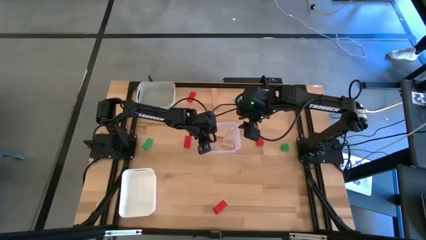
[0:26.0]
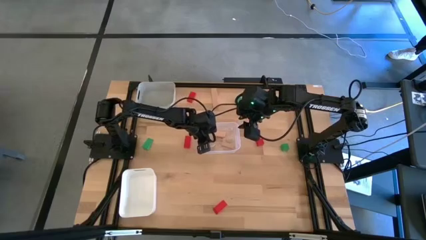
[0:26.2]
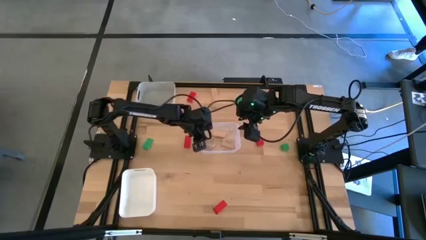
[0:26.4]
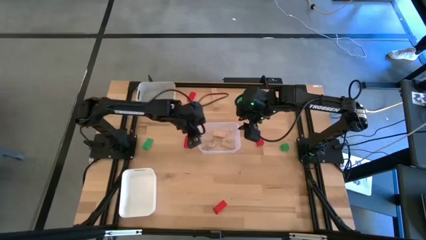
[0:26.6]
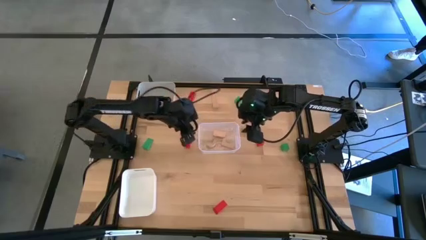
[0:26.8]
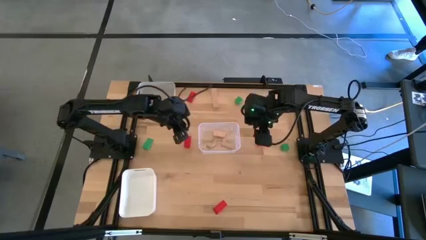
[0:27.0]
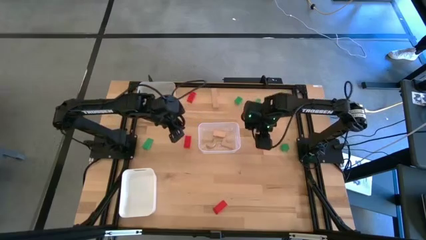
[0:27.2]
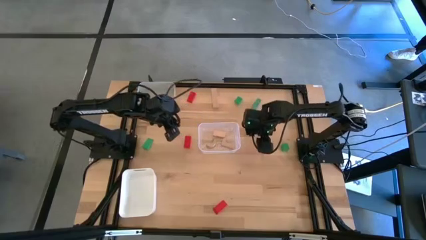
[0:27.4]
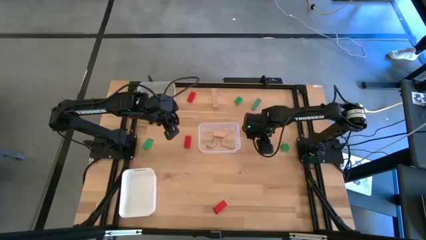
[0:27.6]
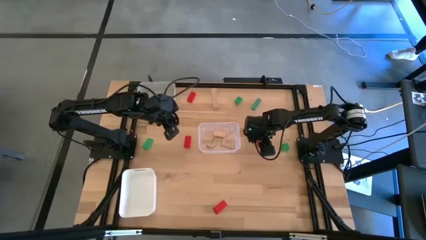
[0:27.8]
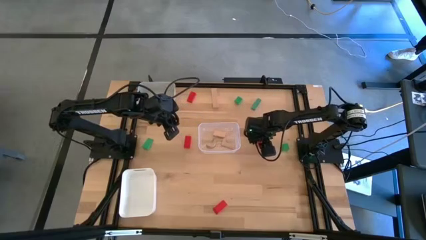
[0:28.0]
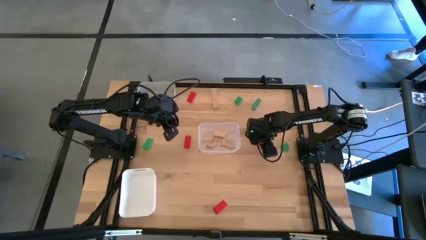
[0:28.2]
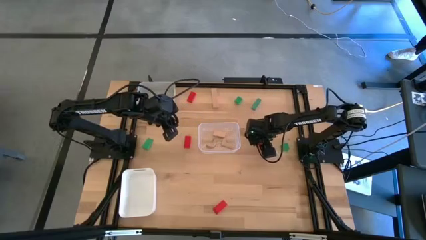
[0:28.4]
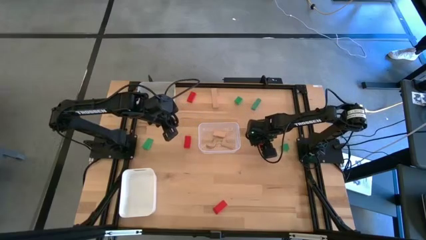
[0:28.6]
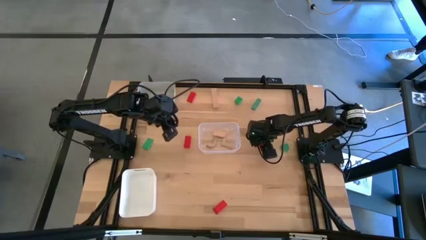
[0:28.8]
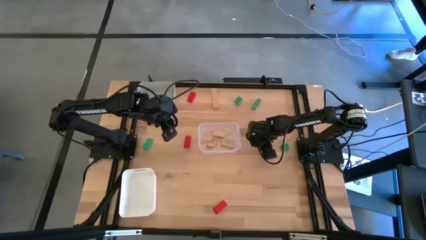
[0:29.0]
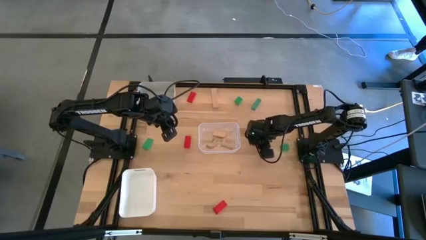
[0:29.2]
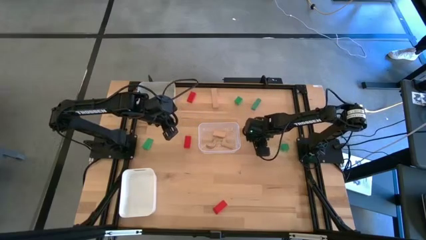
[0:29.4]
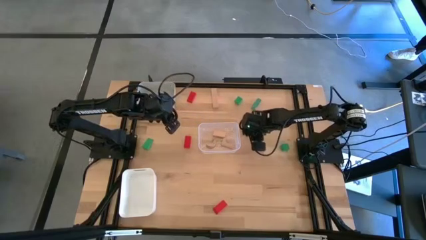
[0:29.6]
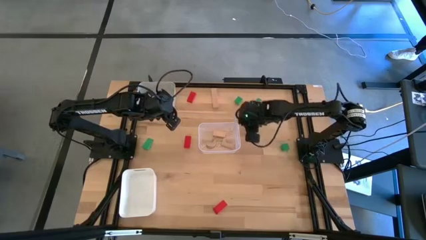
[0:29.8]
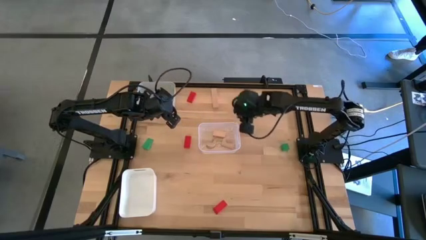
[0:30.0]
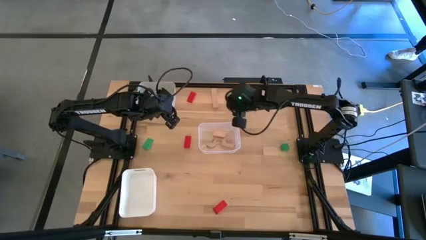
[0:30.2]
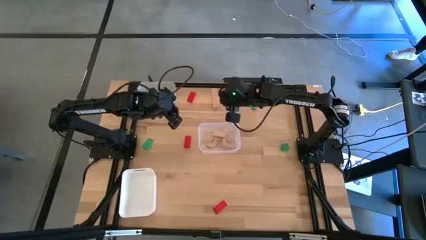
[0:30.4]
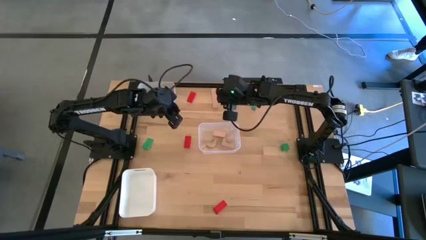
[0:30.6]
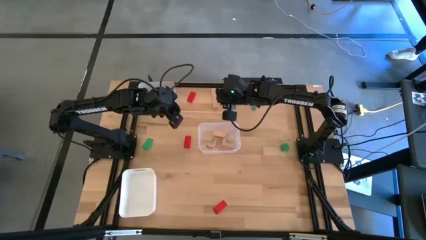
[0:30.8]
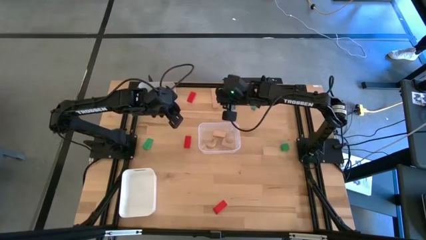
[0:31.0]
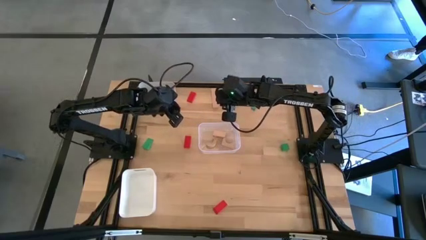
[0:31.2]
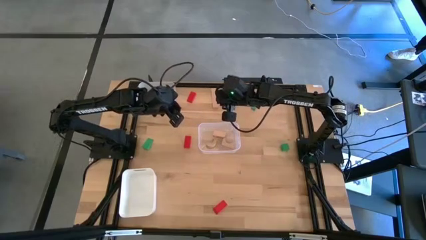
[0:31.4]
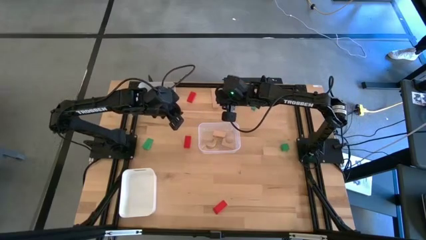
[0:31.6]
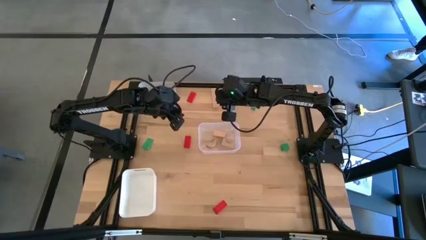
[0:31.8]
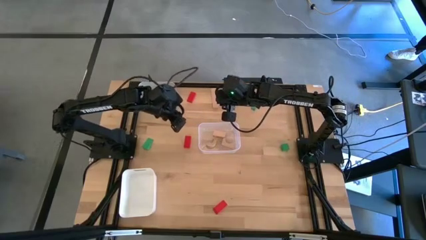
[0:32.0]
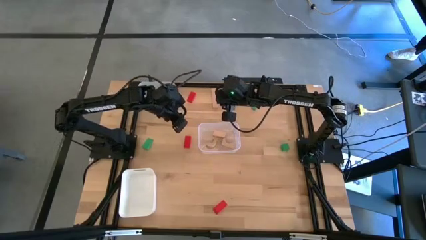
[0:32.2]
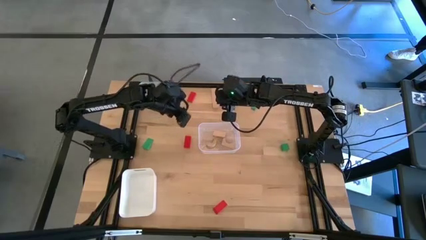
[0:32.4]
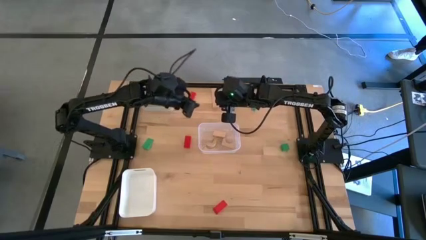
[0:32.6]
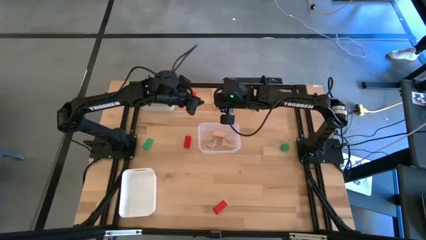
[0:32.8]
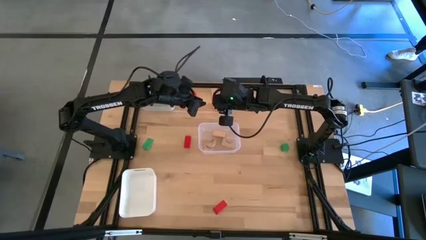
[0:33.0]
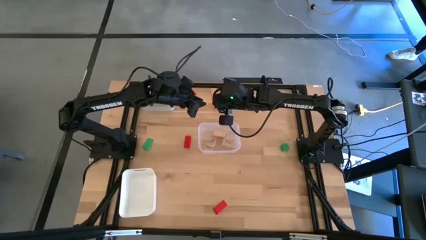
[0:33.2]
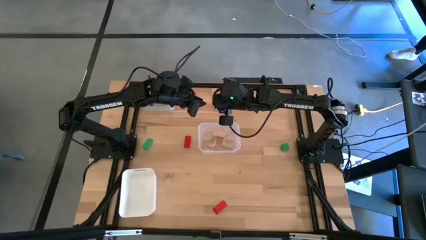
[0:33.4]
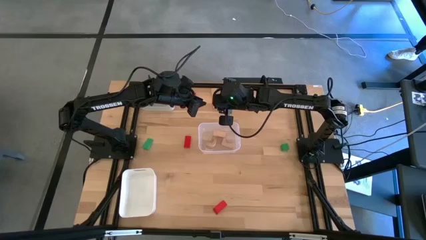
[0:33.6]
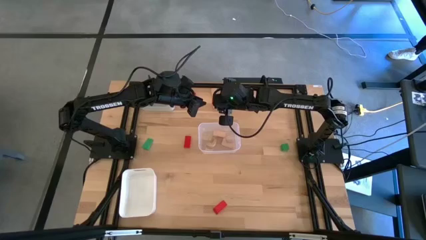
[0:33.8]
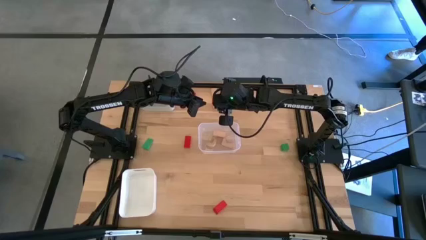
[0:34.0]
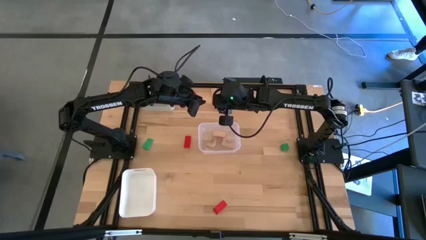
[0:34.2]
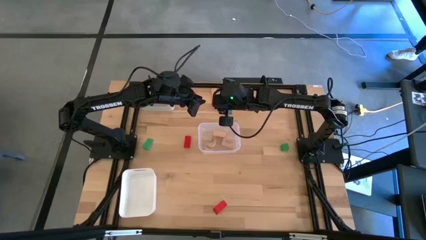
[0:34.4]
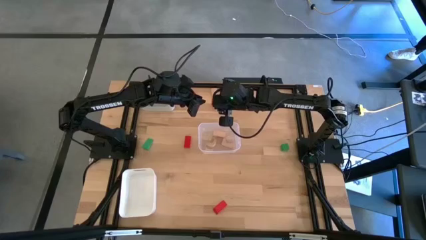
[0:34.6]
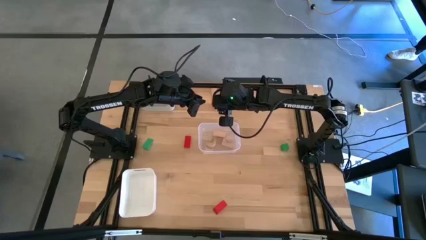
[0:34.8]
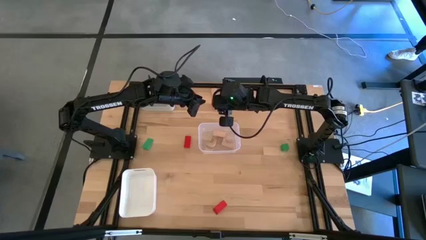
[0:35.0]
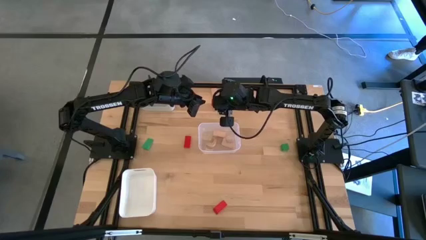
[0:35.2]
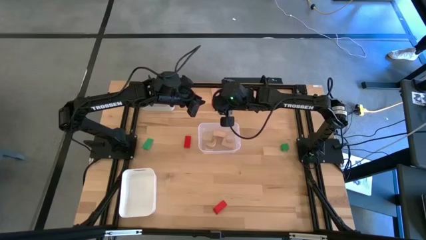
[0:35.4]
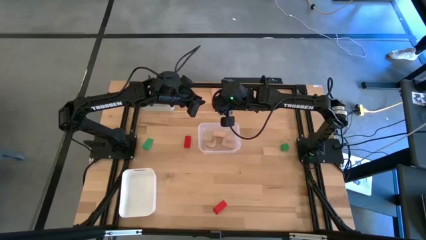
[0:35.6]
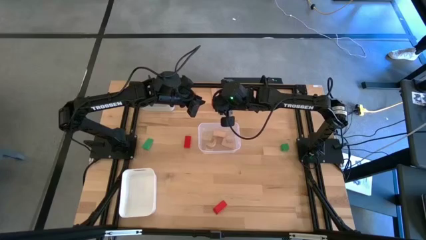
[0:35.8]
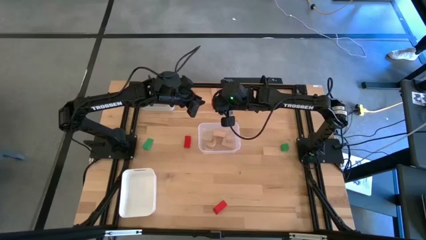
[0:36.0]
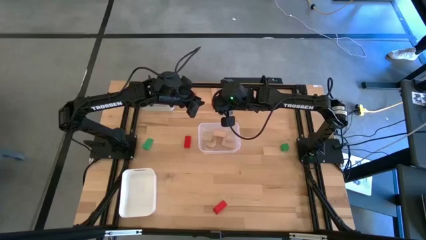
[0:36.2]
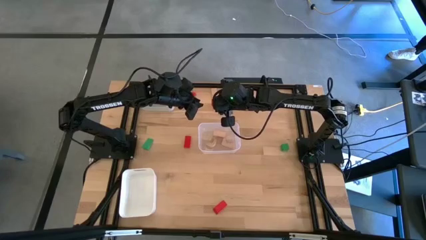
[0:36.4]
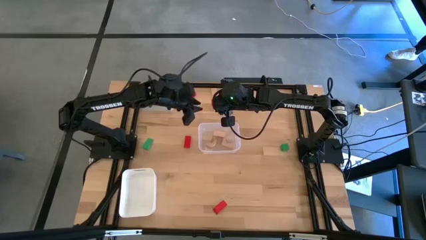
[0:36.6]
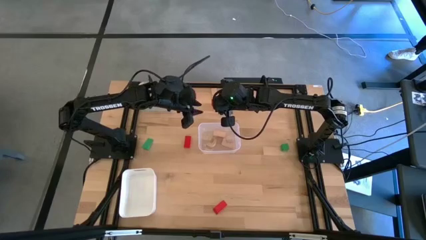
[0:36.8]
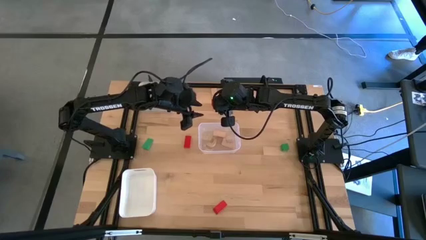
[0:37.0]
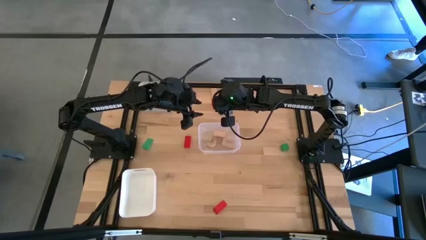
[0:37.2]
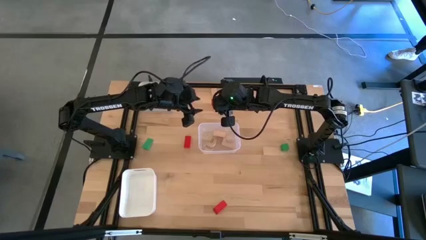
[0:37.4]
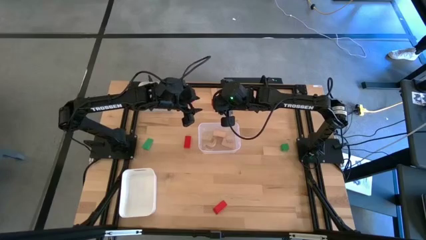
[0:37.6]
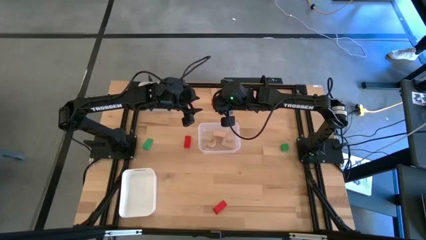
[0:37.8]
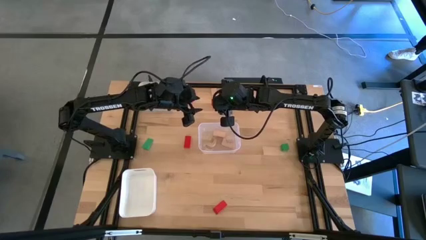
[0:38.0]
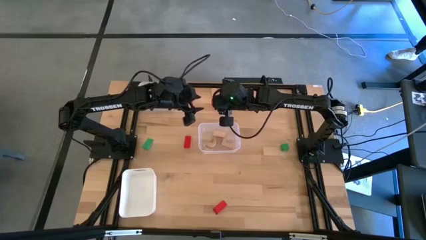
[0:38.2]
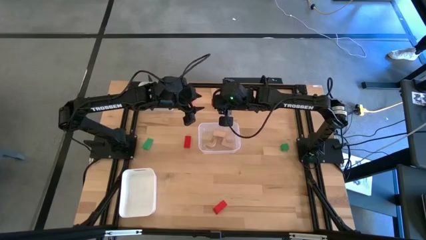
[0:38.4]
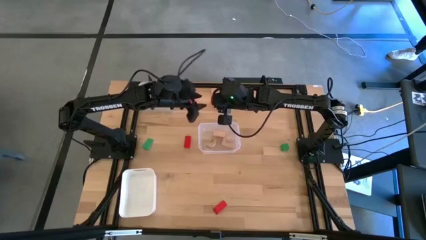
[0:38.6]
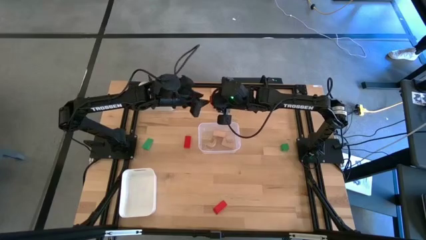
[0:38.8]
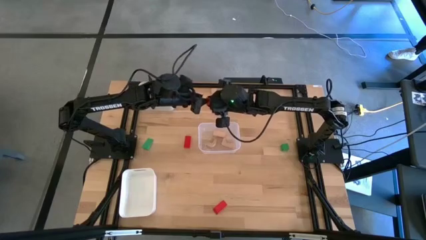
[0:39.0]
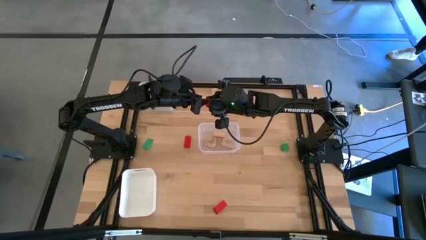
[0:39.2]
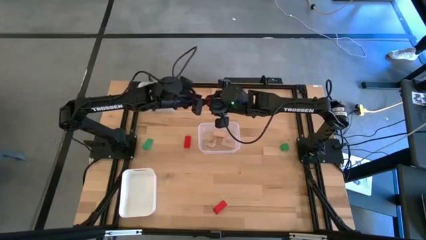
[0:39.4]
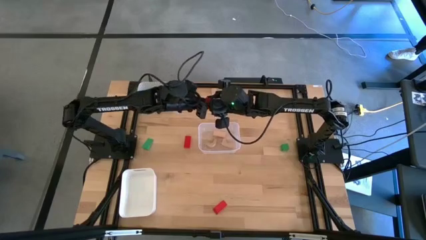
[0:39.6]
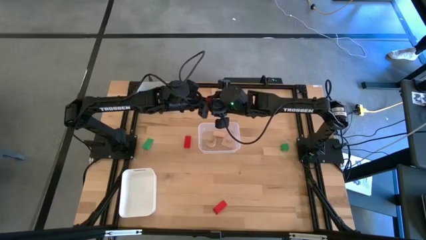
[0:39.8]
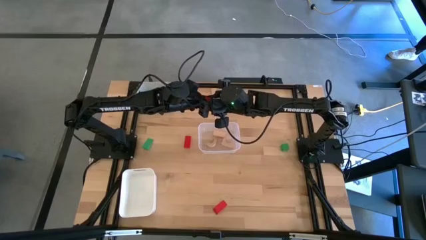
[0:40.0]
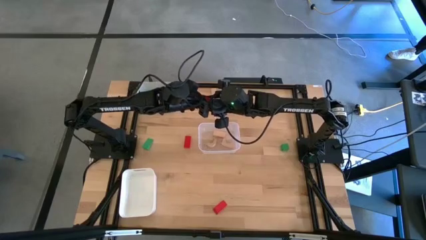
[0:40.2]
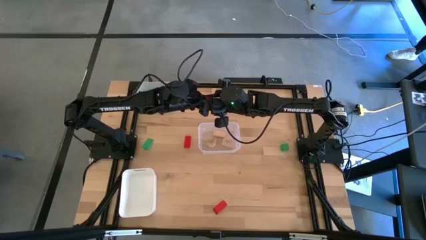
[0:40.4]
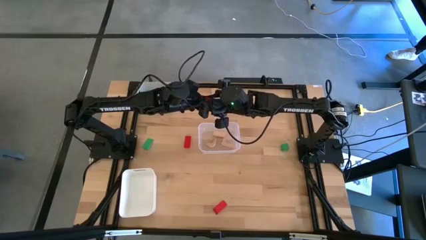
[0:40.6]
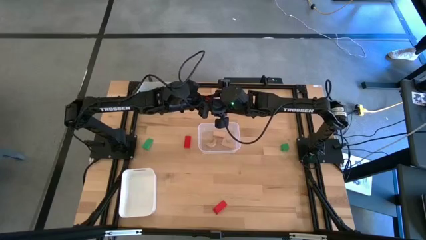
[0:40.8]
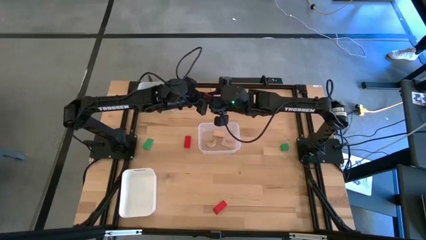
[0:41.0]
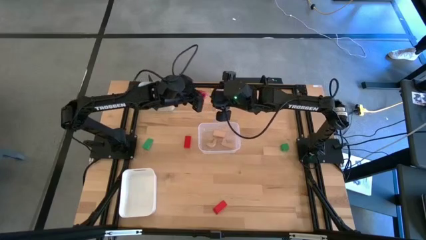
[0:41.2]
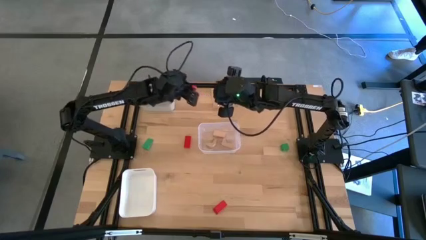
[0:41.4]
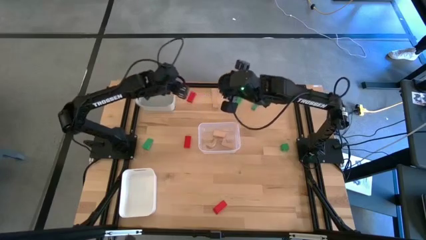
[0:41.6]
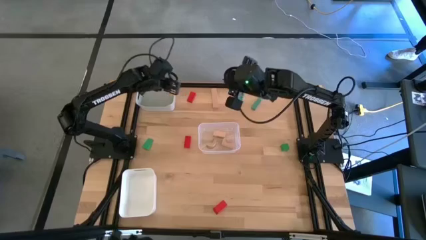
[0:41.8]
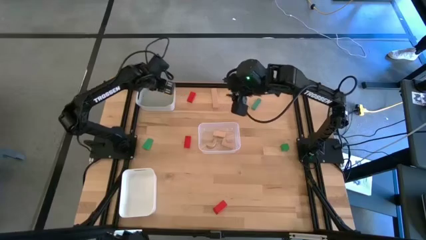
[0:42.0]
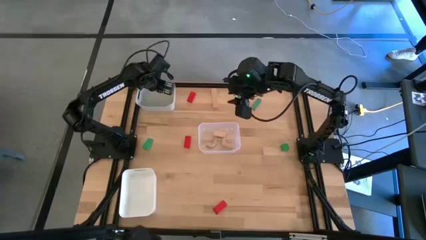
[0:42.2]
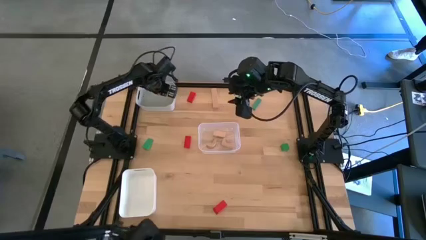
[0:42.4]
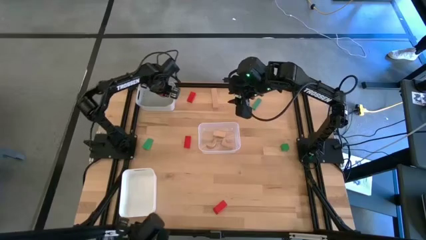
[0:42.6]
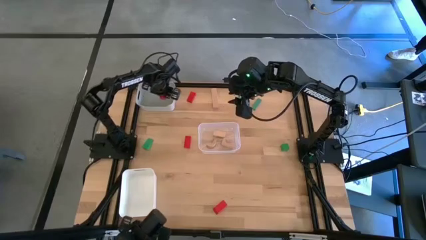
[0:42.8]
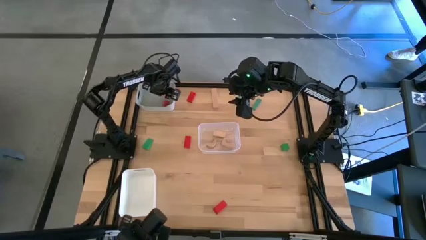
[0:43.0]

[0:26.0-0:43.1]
Task: Sort & place blocks by color
Put the red block into the gray bin
